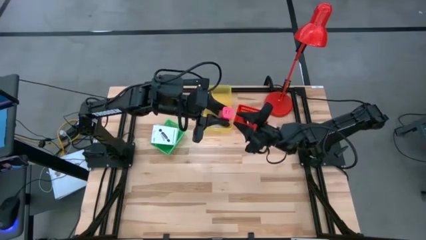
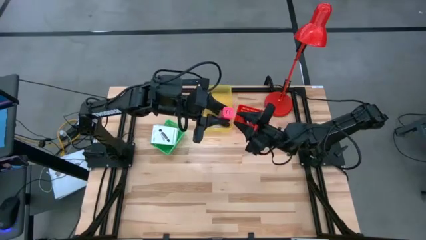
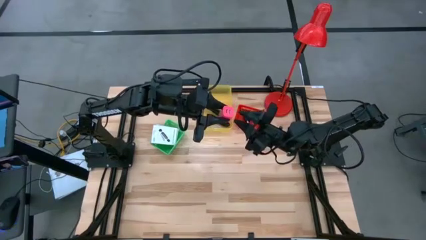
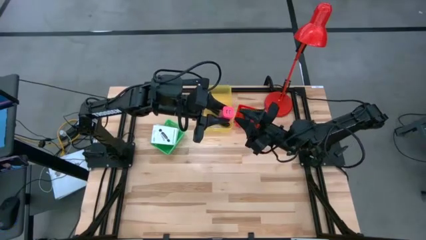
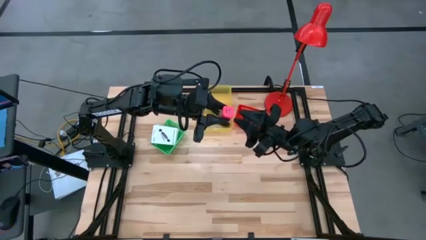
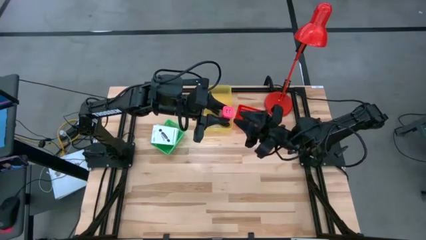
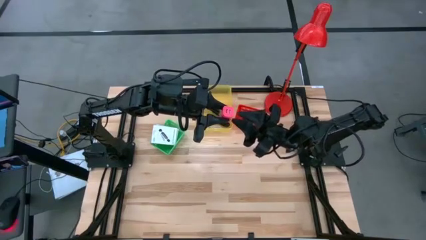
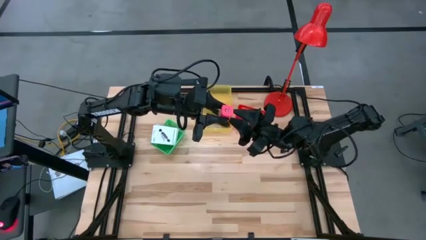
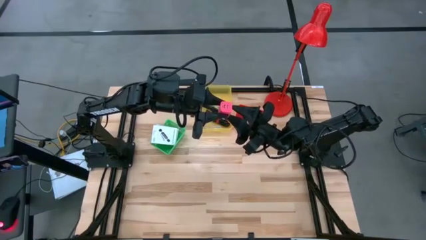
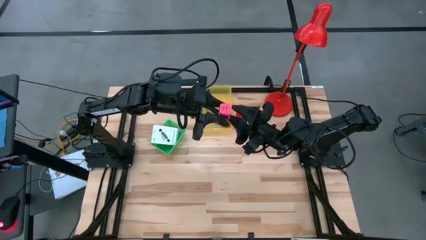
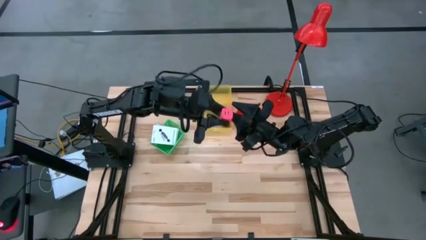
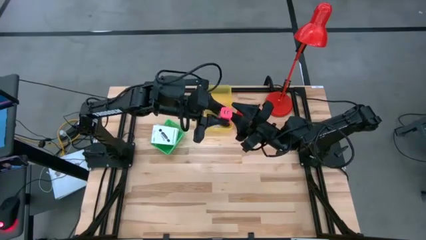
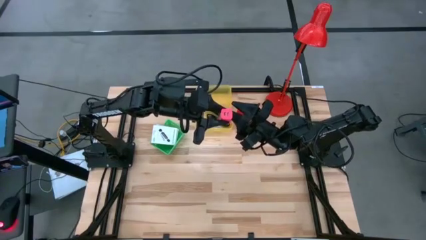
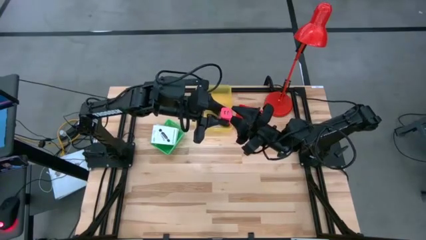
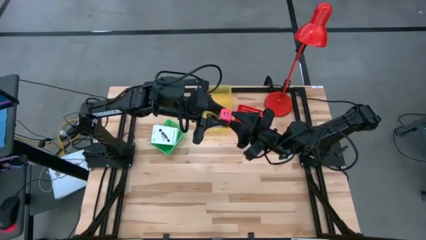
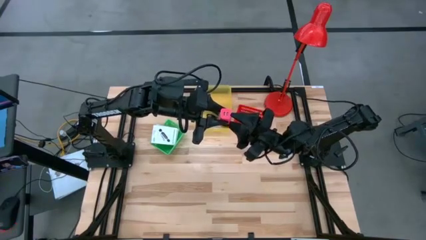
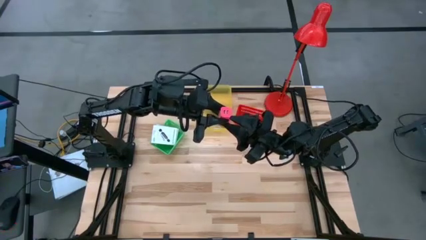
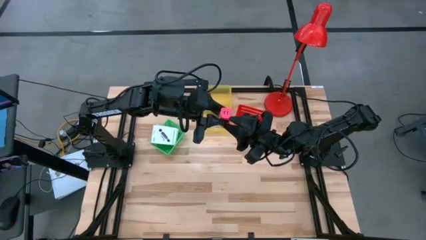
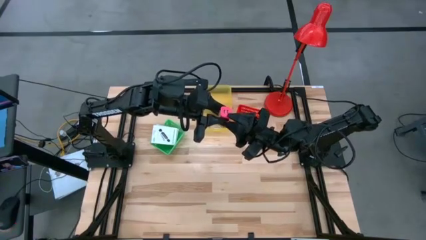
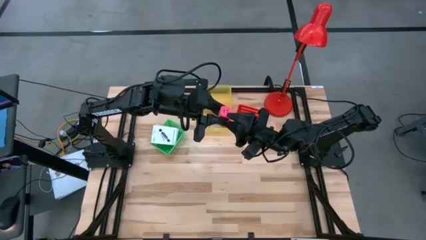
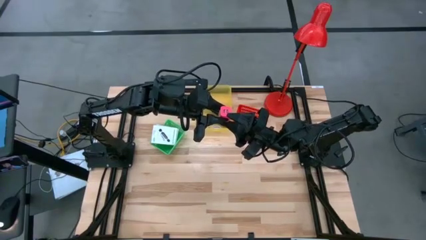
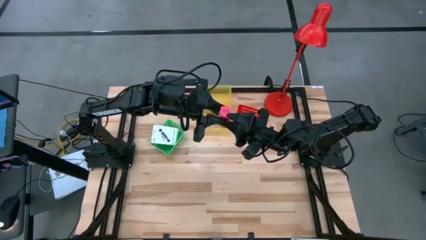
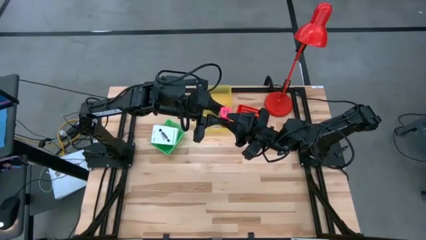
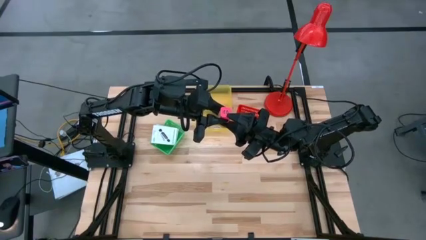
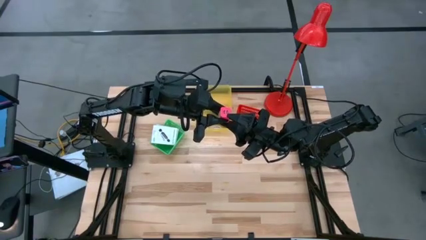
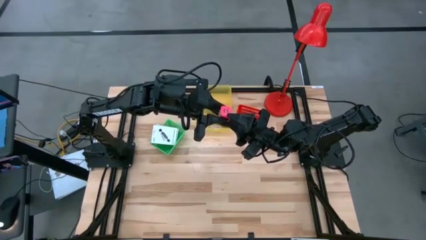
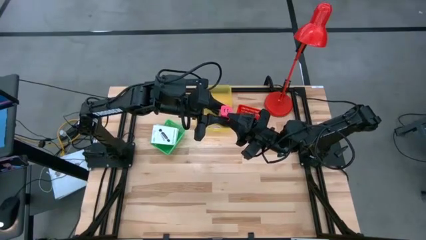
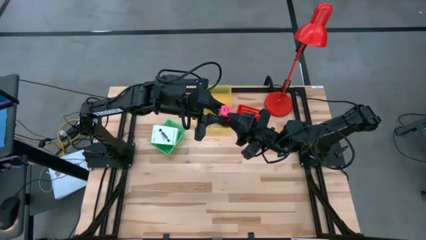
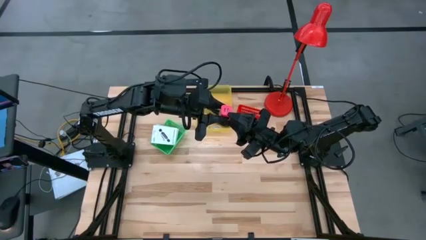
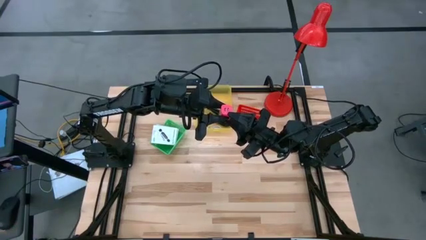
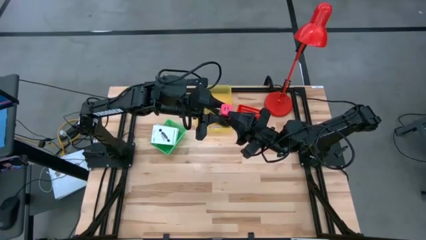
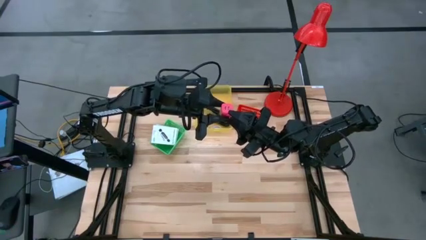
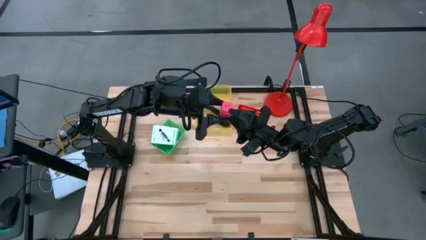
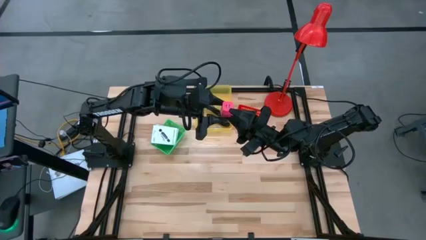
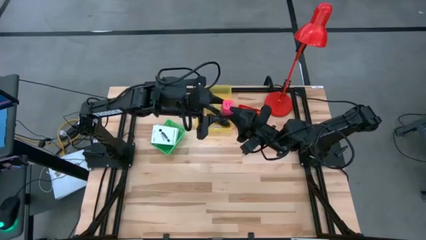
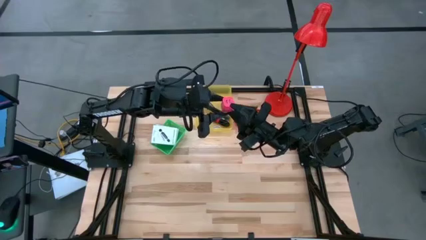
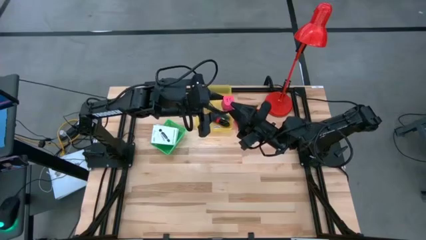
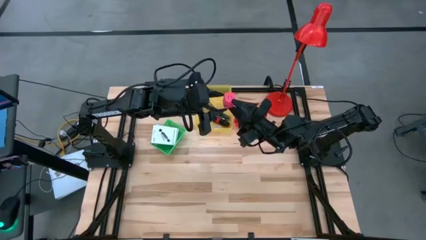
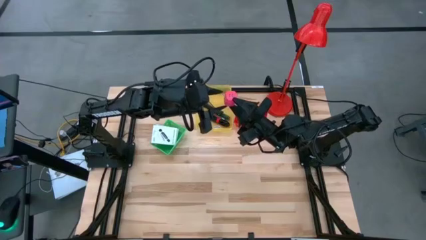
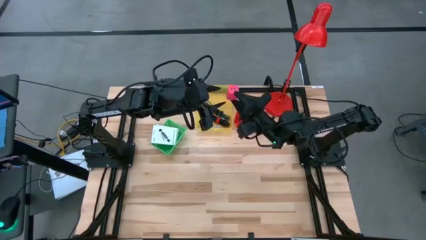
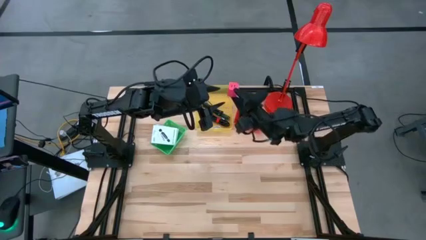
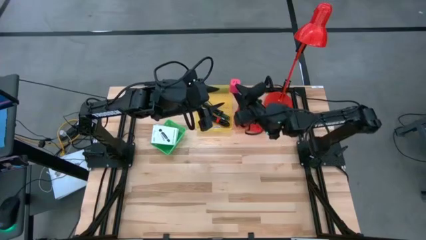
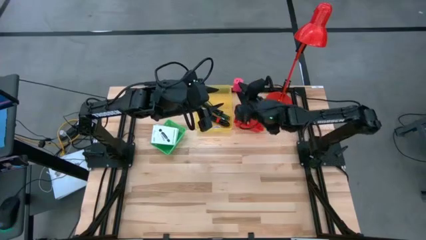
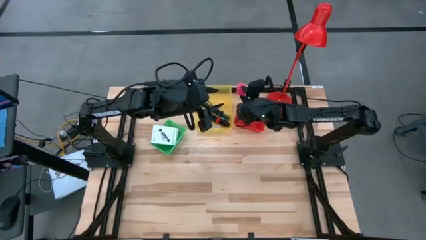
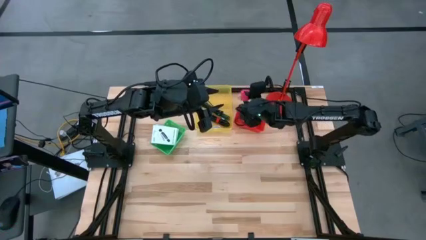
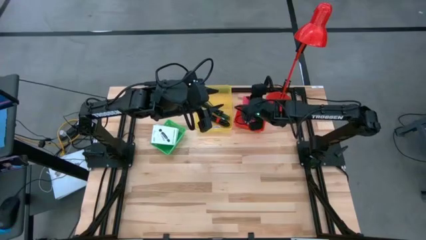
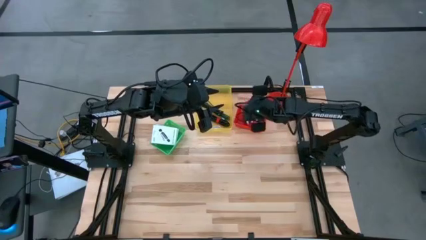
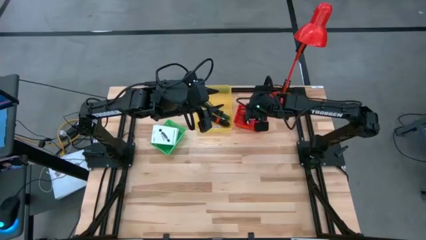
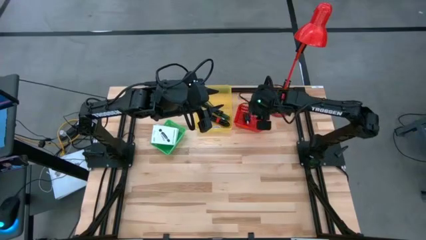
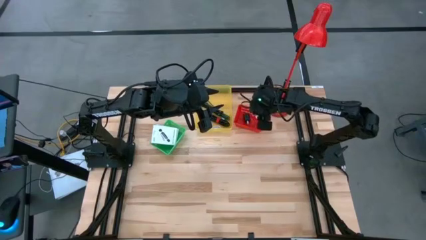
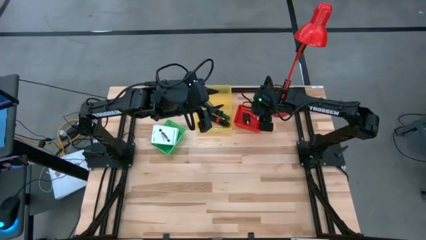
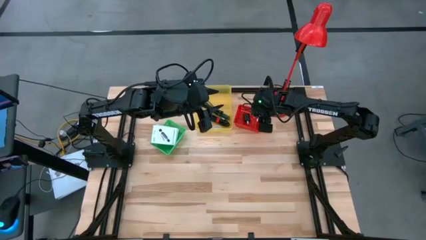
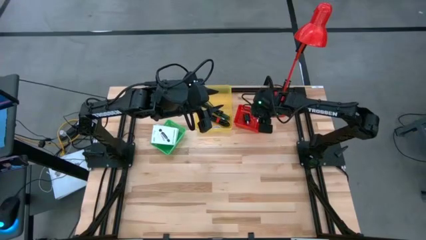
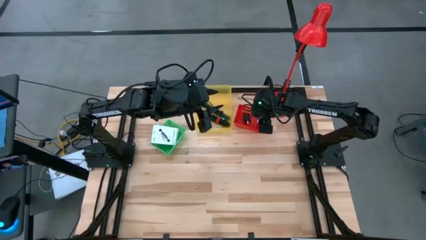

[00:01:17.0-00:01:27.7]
Task: Pick and place items into bin
Put the pink charger adapter into the red basket

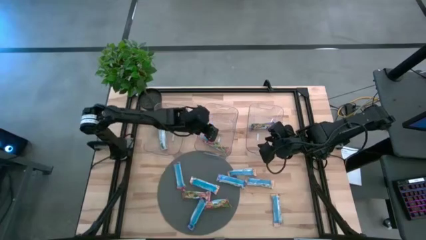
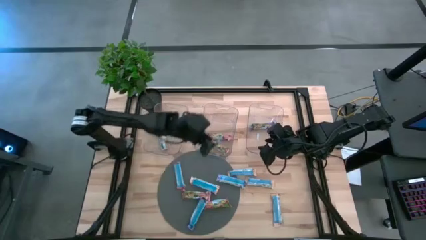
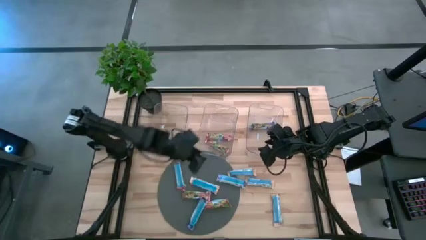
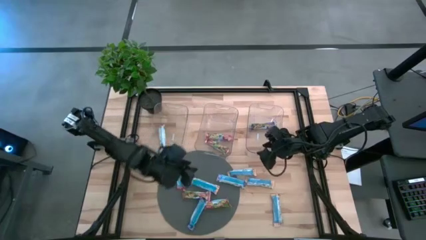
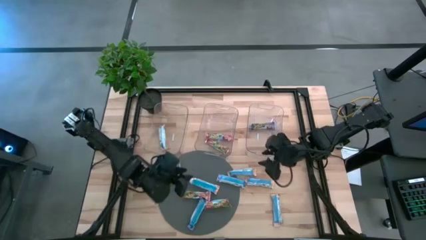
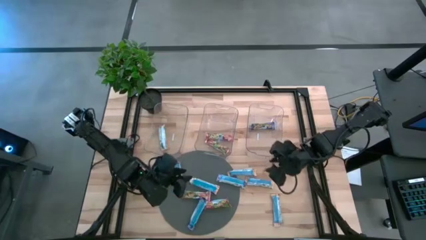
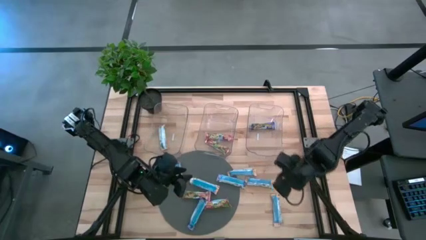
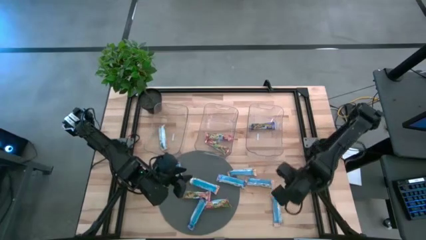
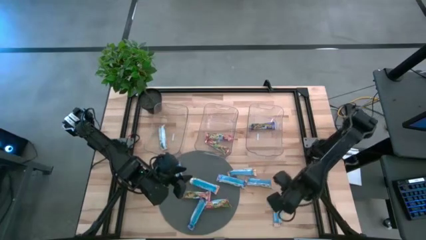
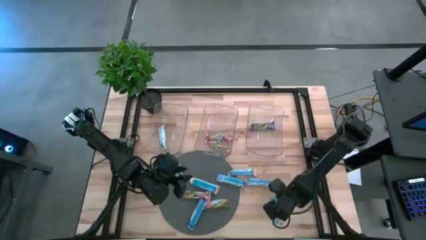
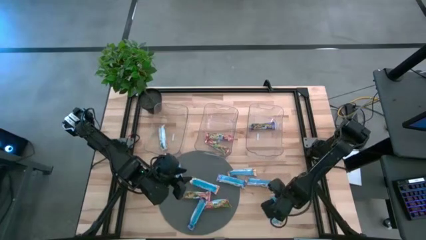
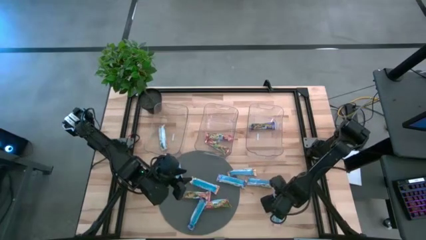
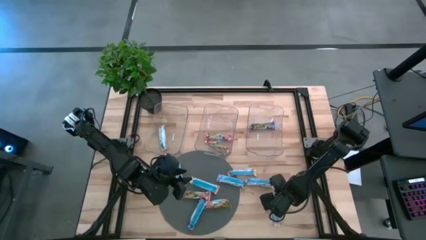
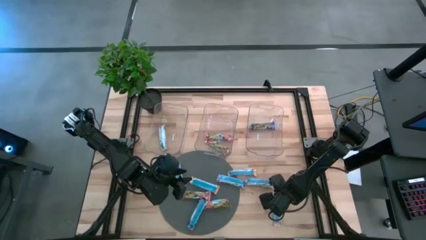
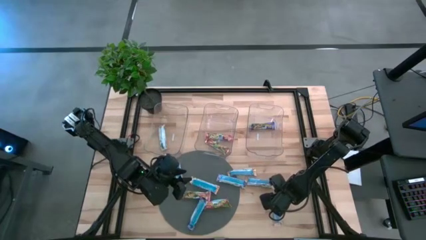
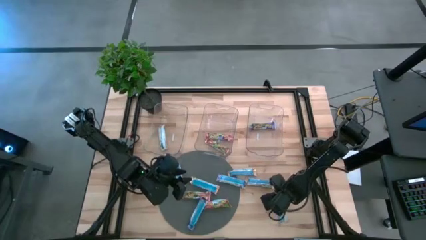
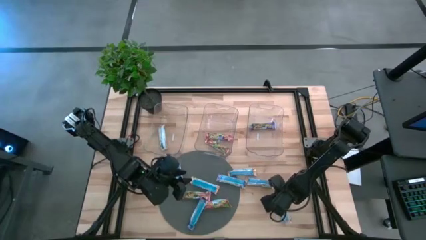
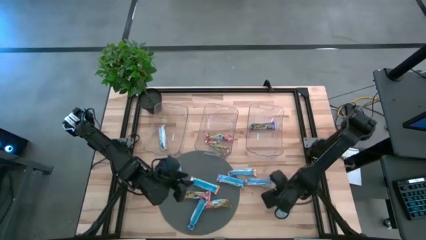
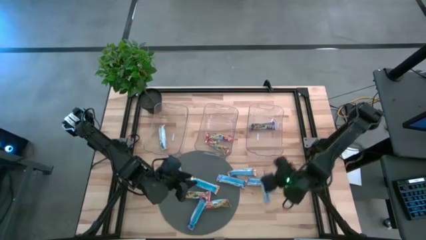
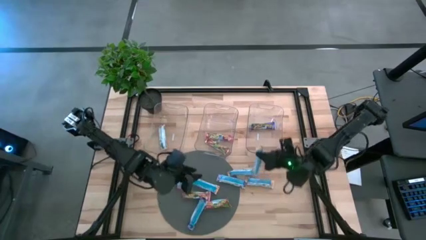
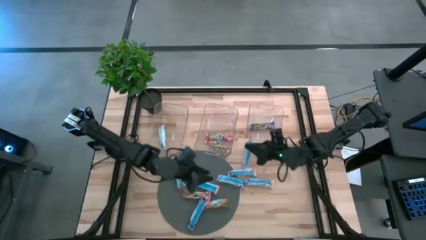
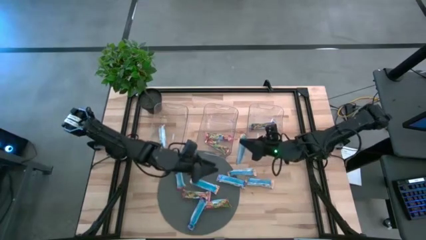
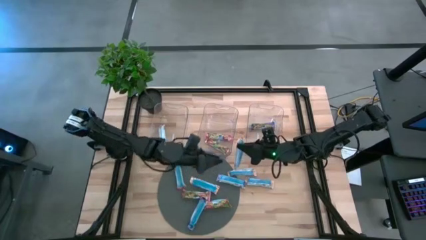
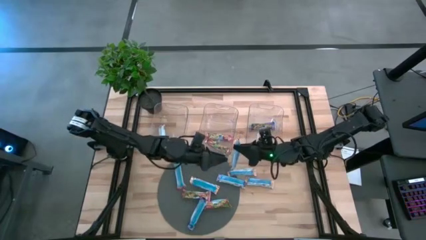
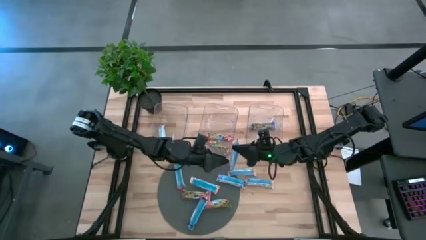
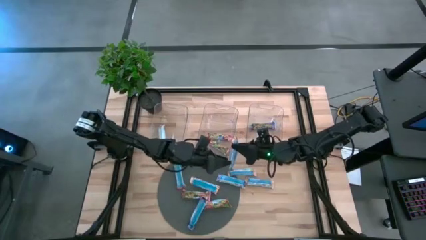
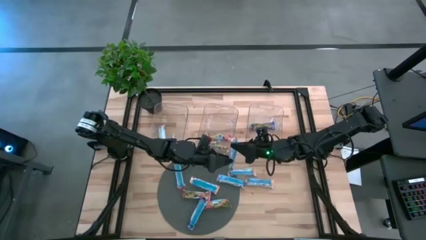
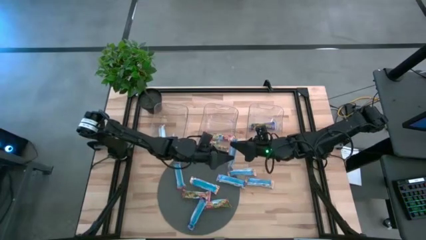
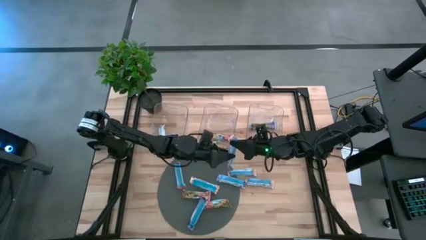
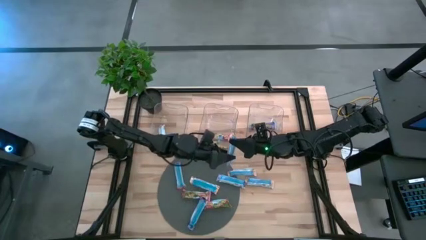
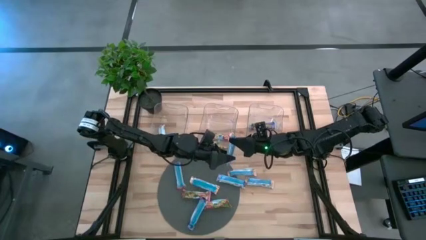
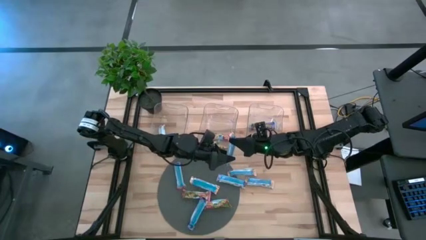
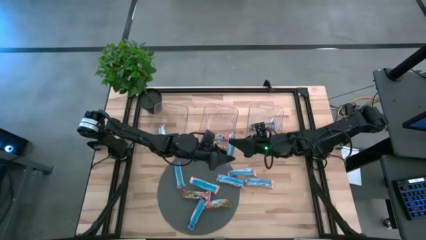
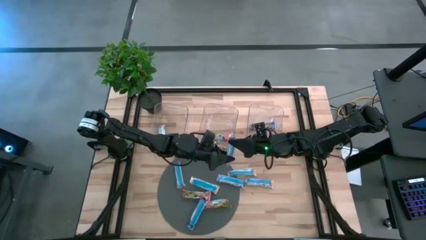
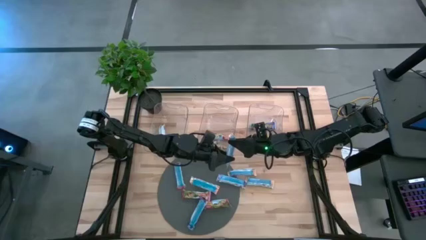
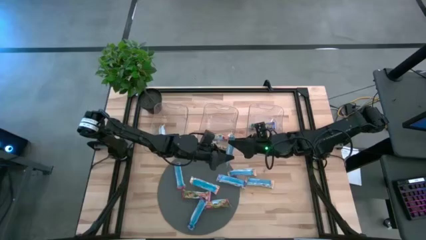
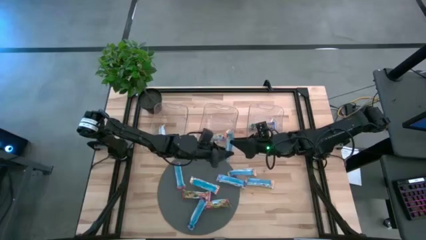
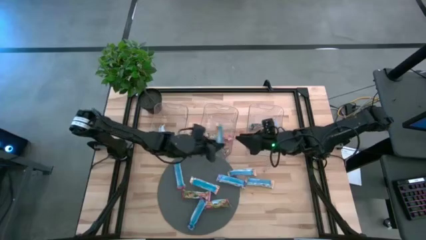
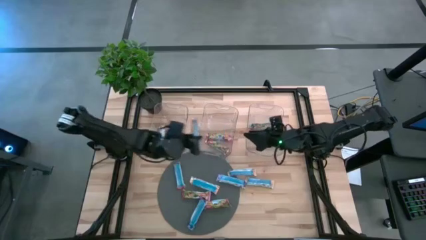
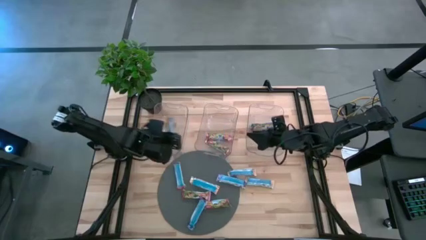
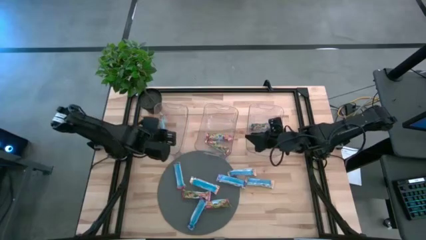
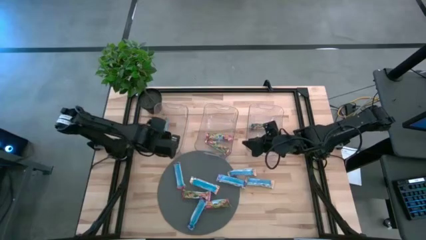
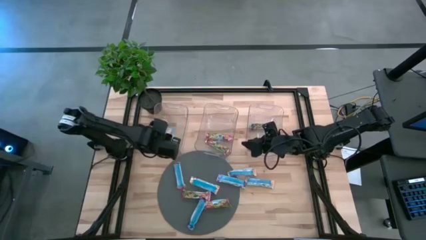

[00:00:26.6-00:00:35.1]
Task: Pick and place Granola Bars by type
Put the yellow granola bar into the left transparent bin
